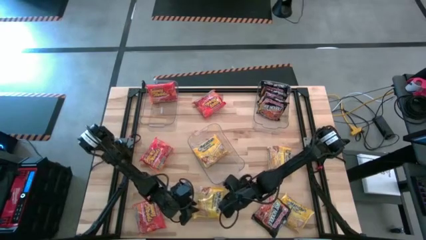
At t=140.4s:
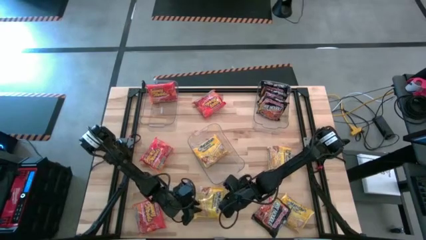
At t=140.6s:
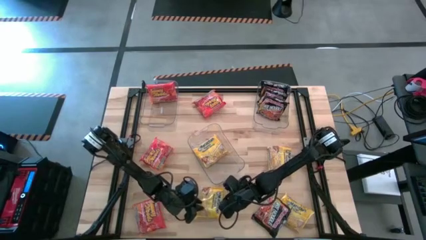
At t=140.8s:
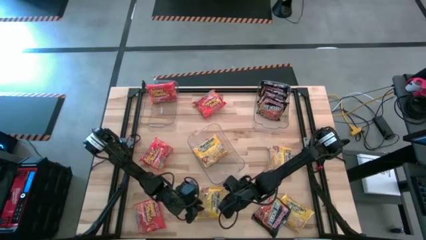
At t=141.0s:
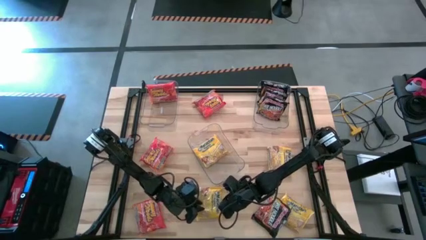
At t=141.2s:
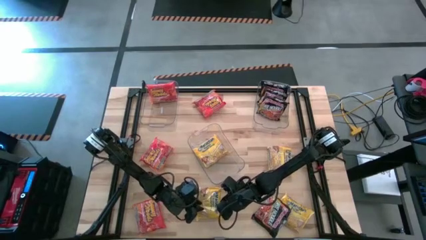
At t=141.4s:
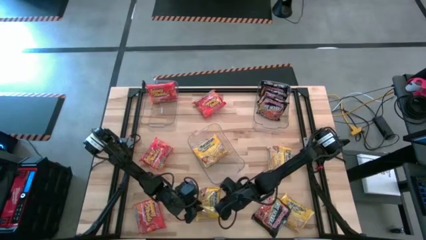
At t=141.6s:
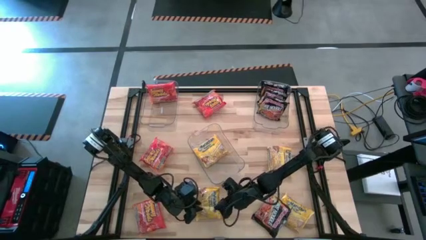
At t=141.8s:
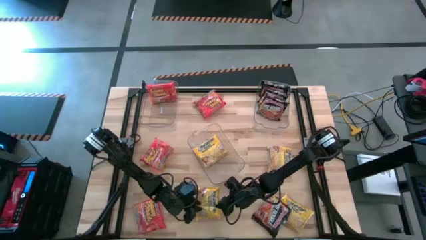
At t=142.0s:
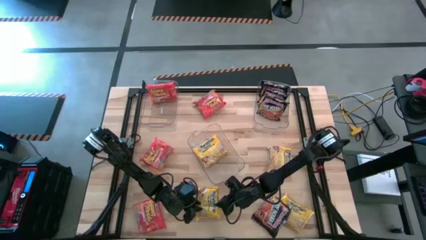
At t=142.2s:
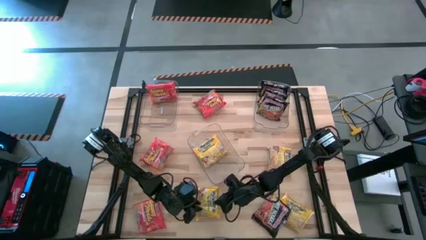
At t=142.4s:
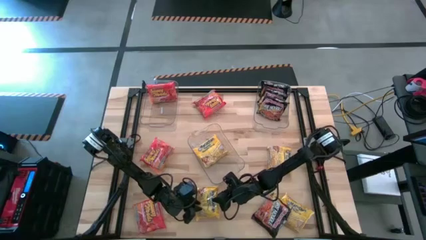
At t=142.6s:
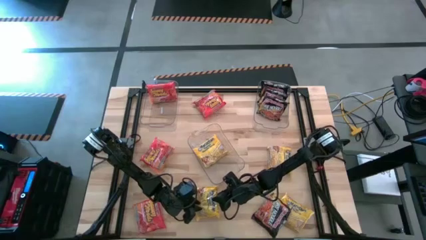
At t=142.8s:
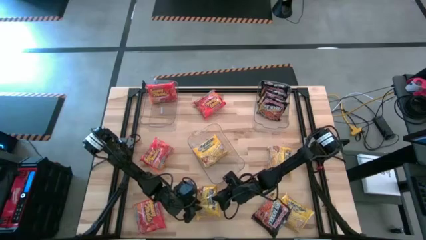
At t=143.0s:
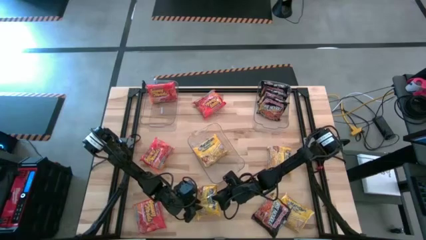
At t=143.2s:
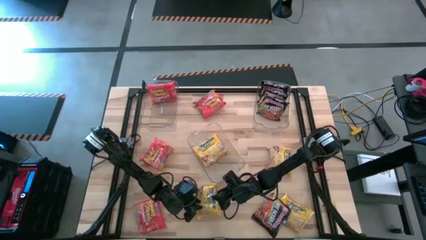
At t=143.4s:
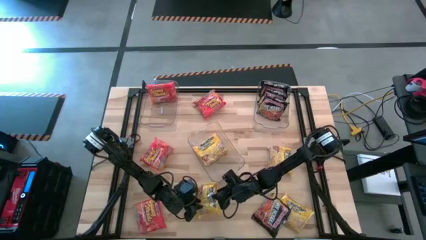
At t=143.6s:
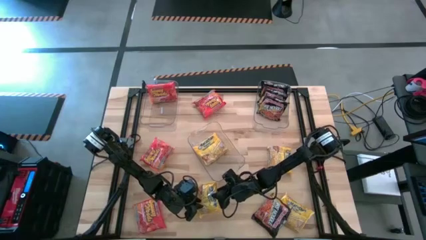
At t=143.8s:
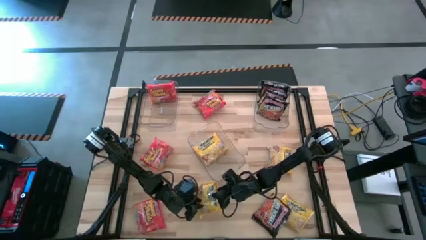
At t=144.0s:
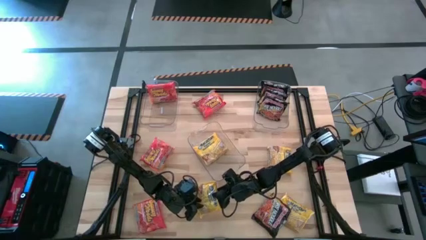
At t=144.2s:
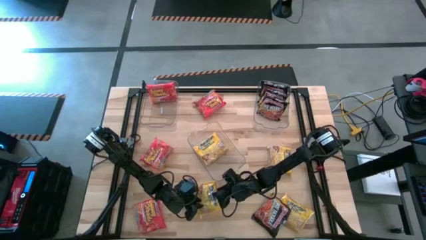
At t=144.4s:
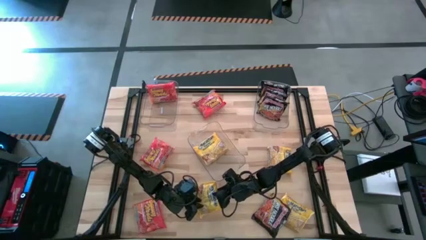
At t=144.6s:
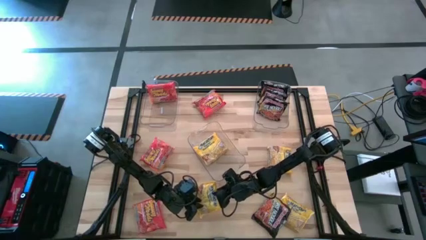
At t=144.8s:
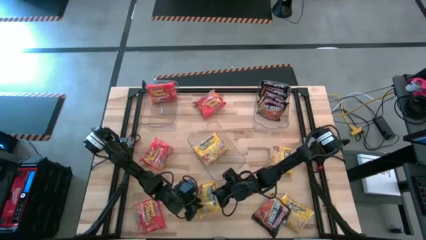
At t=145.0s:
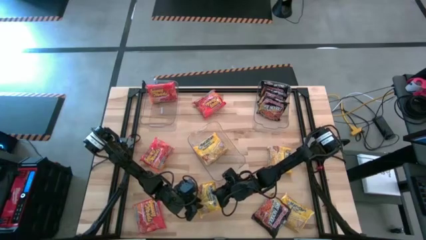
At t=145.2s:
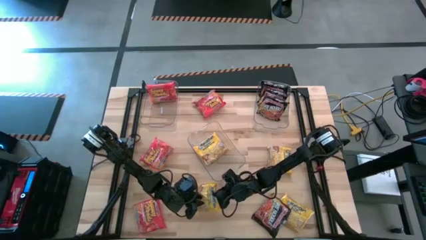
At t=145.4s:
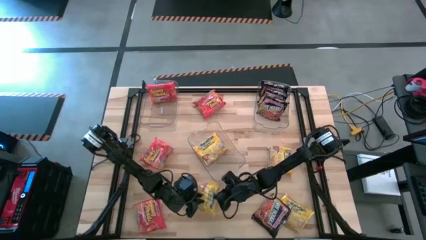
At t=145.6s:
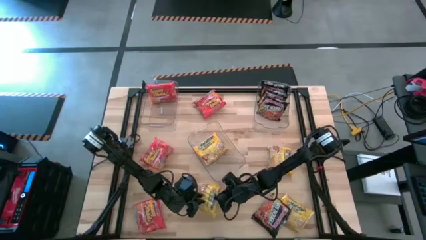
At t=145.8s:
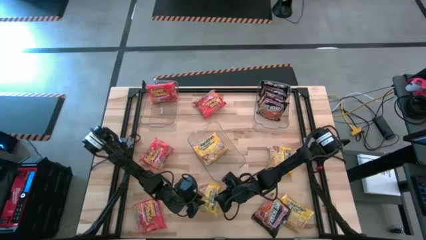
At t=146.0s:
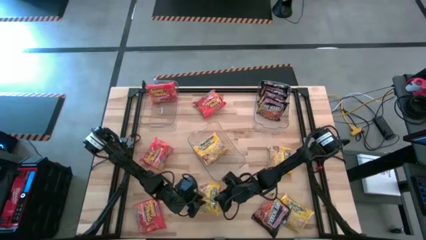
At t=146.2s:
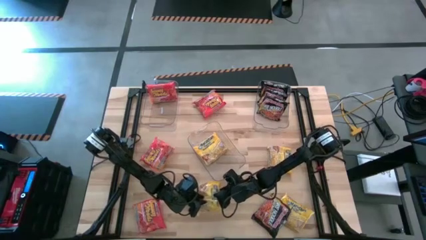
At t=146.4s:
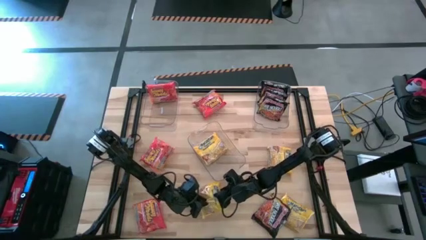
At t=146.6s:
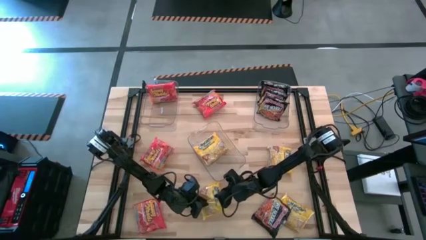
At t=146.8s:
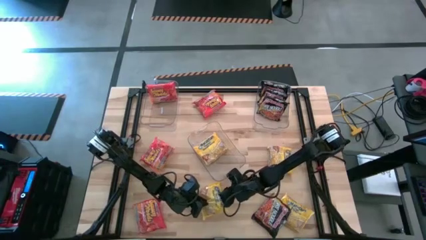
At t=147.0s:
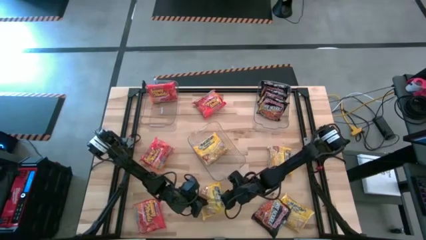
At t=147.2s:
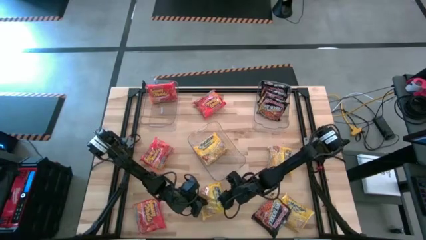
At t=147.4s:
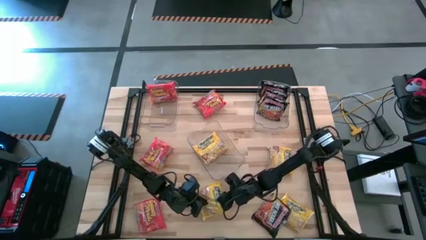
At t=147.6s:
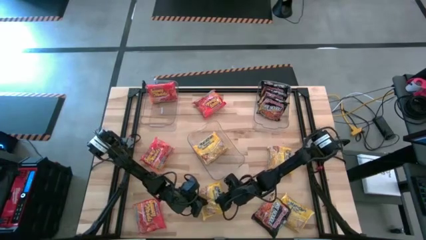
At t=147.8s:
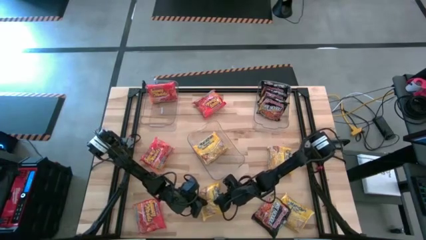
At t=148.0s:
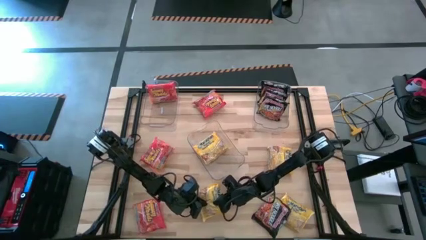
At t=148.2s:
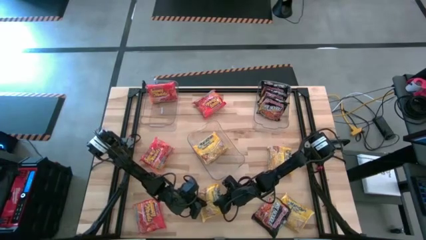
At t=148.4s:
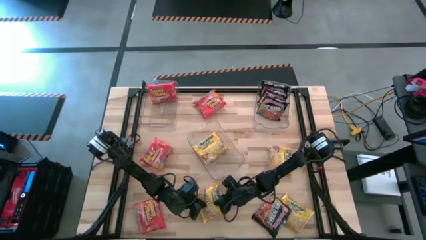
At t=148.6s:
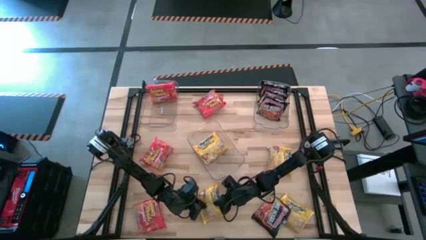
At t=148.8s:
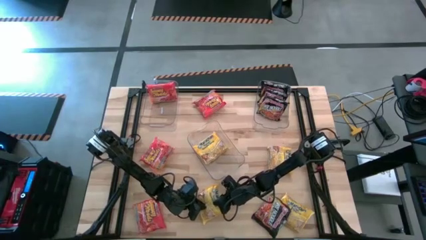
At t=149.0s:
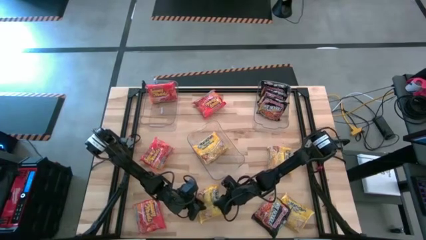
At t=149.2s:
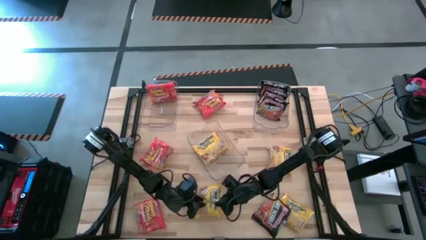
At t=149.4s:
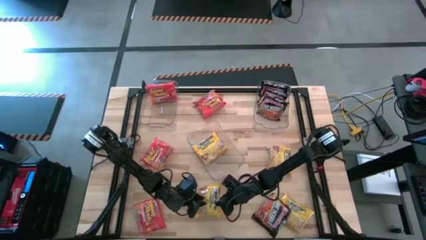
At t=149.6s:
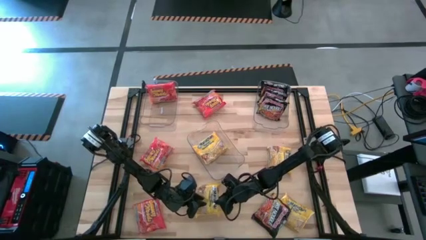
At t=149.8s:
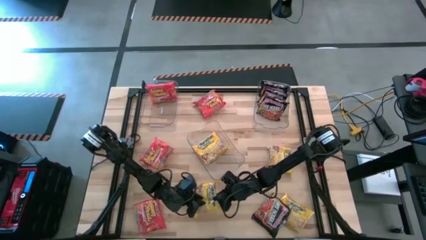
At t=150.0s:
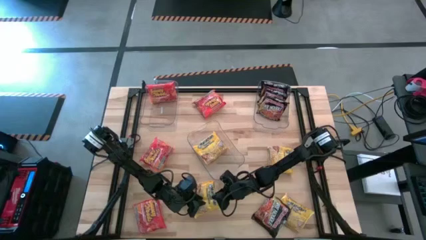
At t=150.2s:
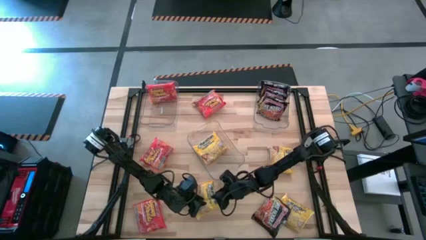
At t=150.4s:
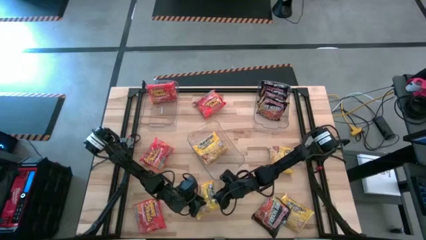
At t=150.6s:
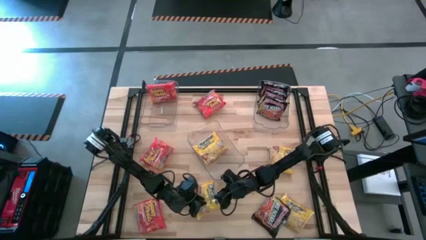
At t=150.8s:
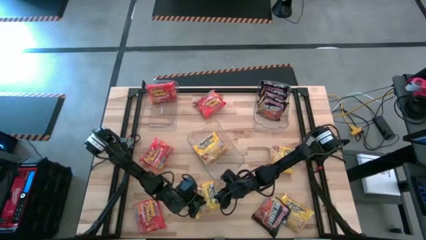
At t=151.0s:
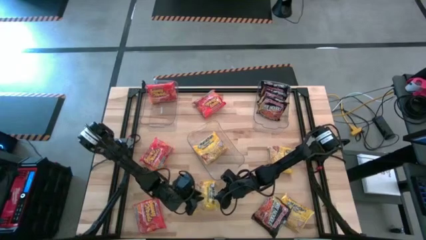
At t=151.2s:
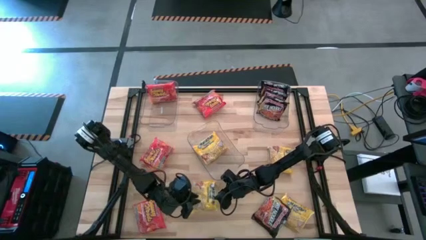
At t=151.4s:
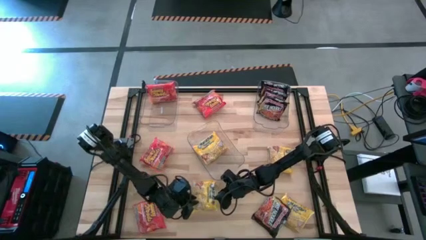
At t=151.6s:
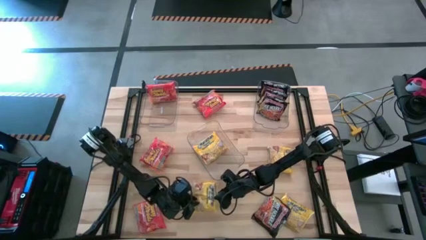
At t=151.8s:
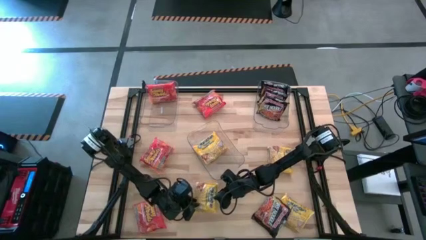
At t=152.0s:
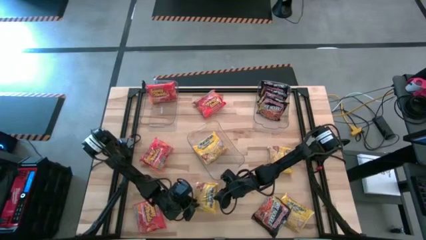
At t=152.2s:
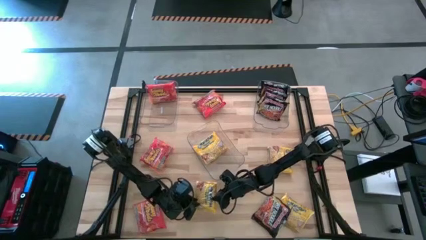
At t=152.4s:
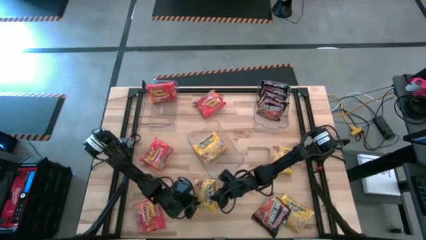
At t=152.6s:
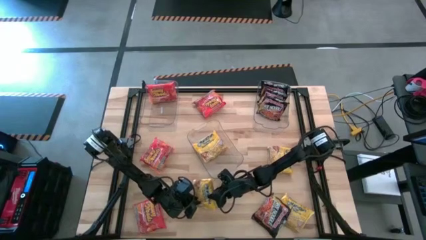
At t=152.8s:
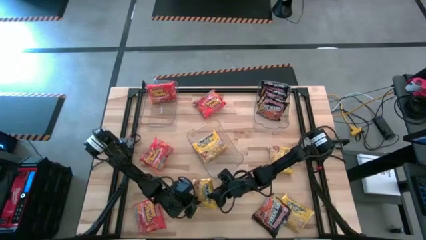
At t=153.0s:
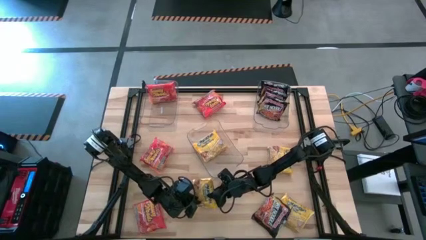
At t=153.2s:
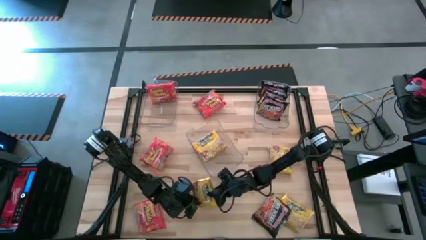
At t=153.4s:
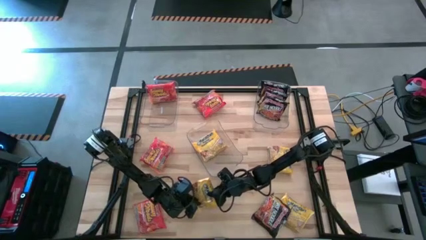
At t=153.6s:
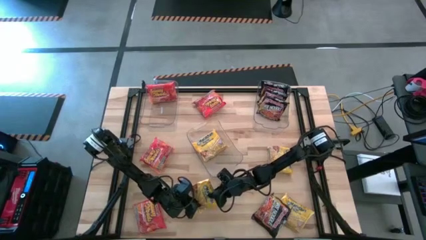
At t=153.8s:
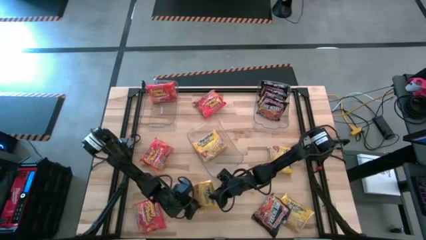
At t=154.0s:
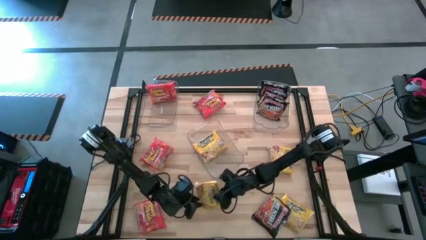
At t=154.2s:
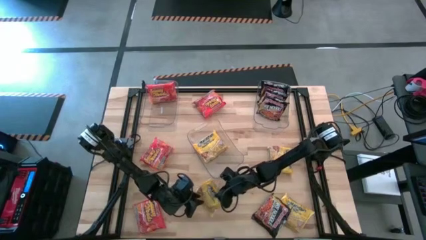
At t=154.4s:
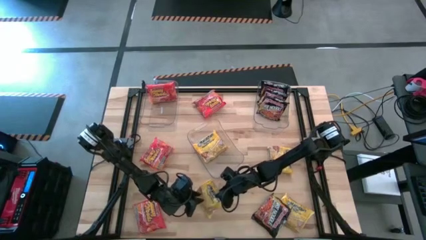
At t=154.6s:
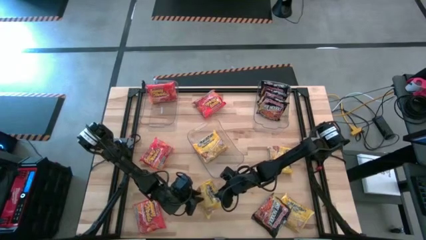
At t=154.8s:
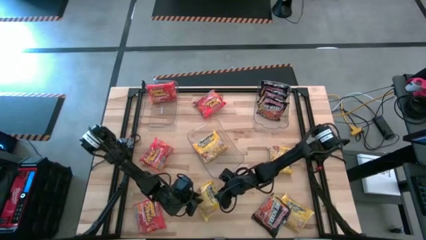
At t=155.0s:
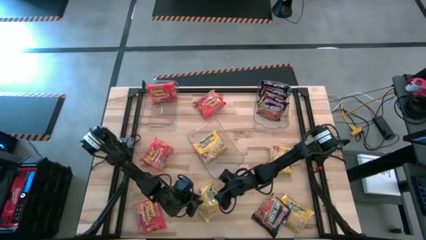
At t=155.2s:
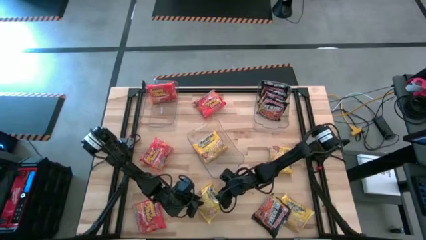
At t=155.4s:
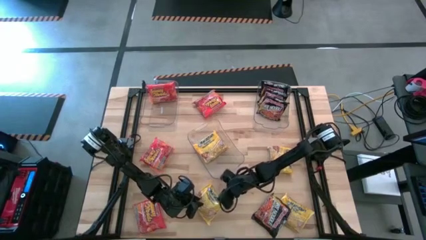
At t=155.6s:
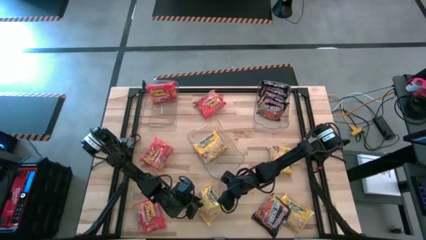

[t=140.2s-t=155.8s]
Task: Sort Maruchan noodles
Put the bottom left yellow noodle pack into the center transparent bin

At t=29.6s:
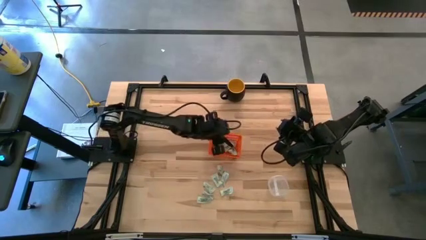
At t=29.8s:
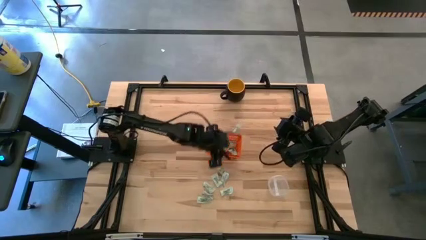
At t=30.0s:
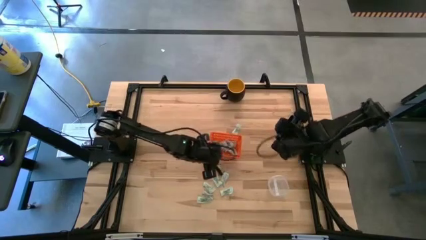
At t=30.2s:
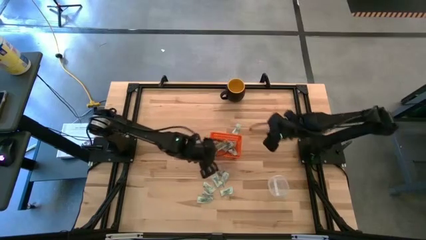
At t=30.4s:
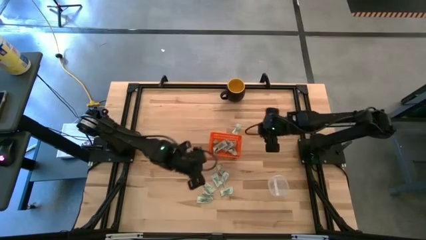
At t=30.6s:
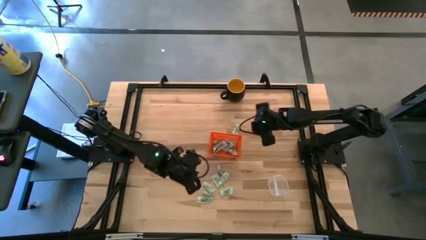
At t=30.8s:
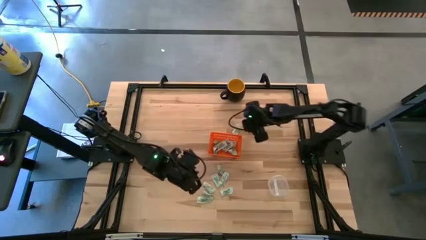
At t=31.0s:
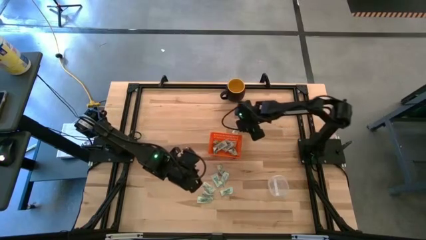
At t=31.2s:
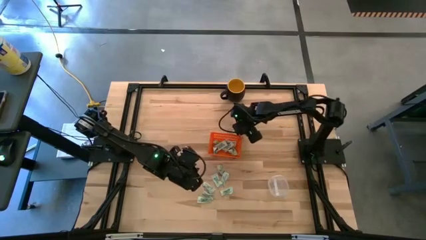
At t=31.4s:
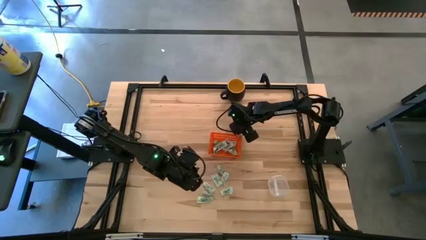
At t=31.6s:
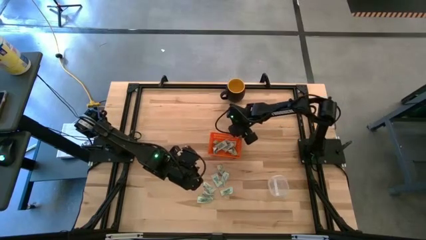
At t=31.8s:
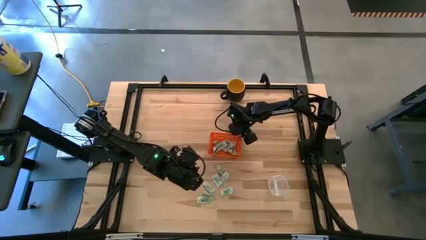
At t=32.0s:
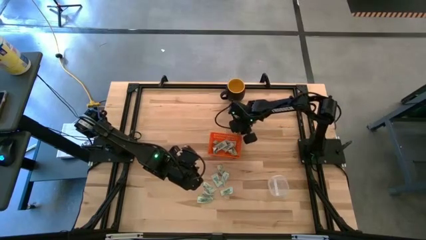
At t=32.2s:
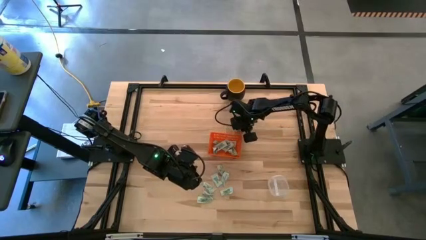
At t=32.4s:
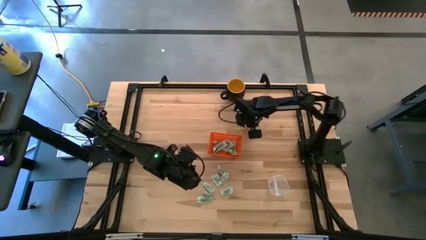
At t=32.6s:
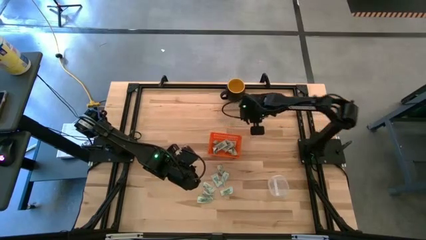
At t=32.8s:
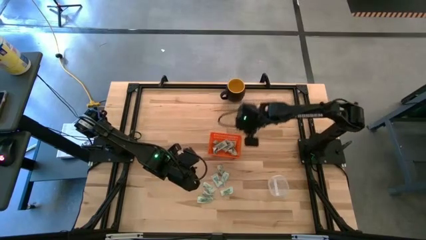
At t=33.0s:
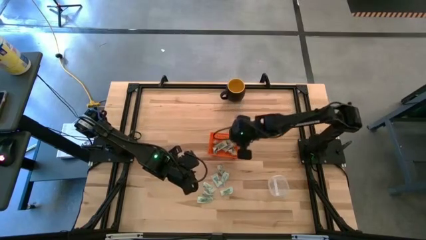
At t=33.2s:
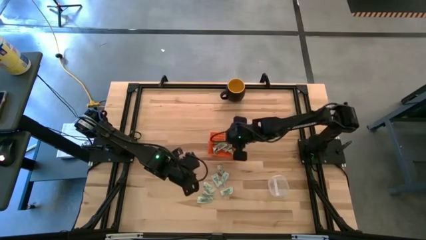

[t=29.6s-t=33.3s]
Task: Pick and place items into bin
Put the light green stevia packet into the orange bin
